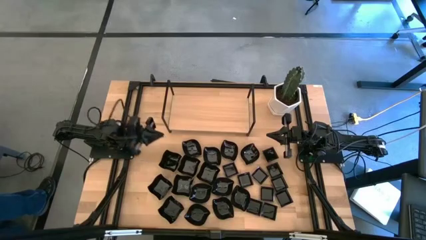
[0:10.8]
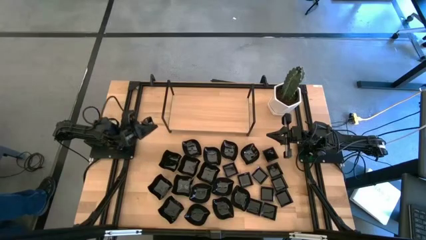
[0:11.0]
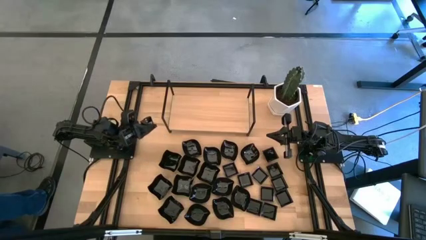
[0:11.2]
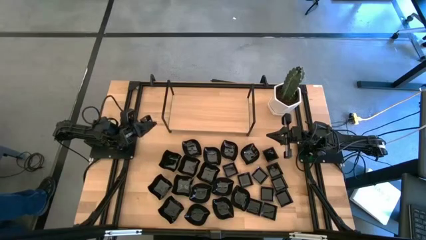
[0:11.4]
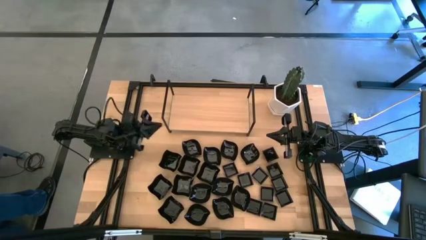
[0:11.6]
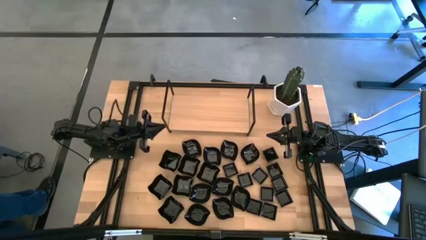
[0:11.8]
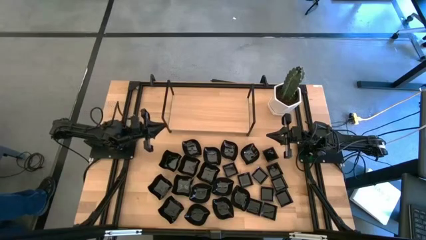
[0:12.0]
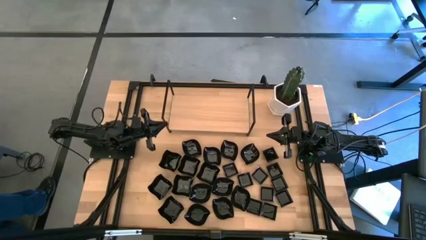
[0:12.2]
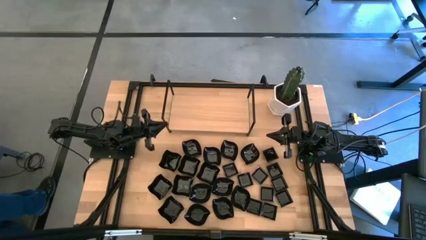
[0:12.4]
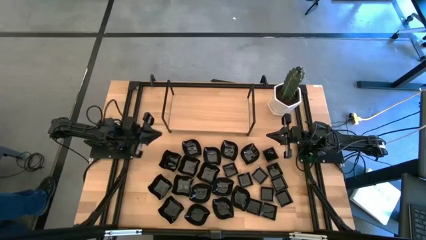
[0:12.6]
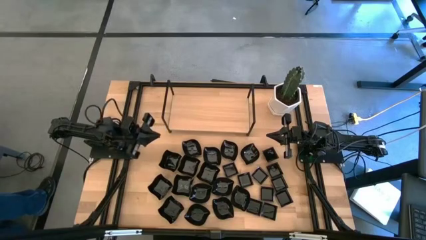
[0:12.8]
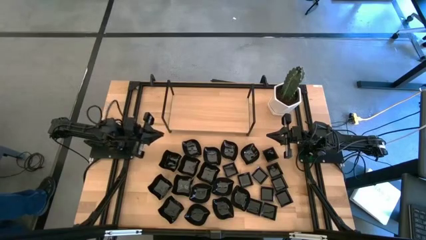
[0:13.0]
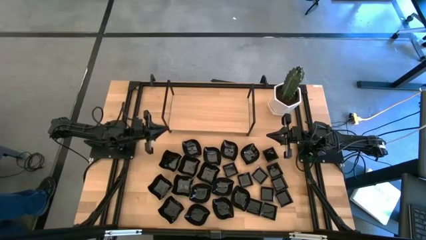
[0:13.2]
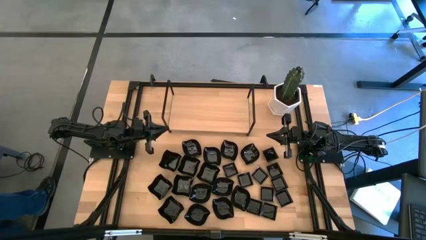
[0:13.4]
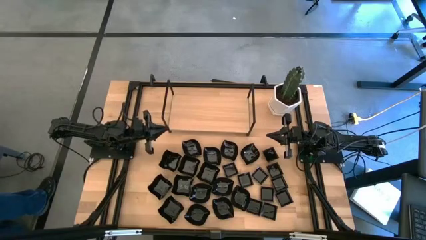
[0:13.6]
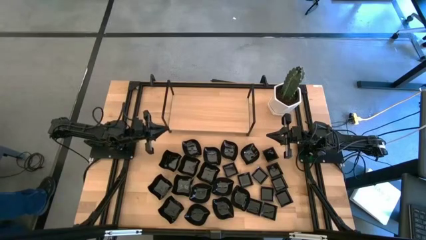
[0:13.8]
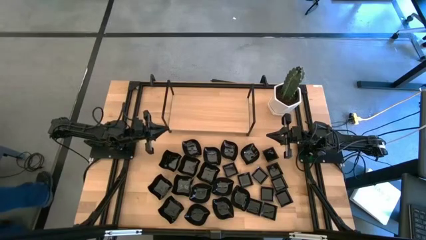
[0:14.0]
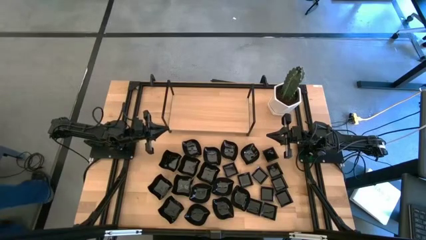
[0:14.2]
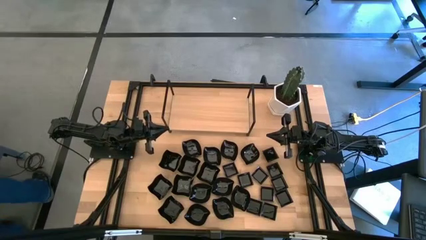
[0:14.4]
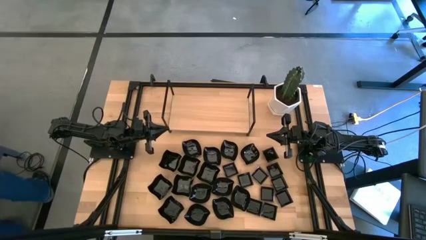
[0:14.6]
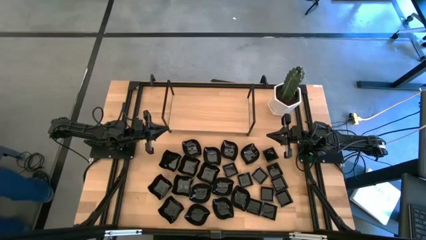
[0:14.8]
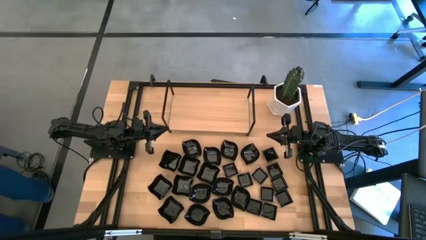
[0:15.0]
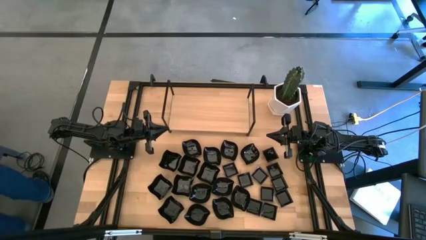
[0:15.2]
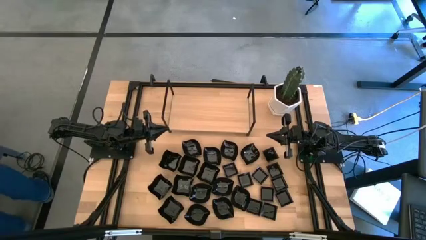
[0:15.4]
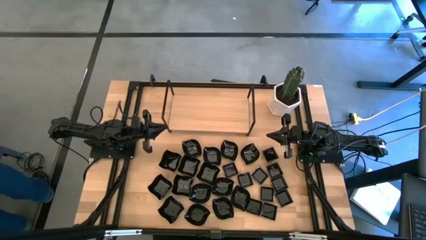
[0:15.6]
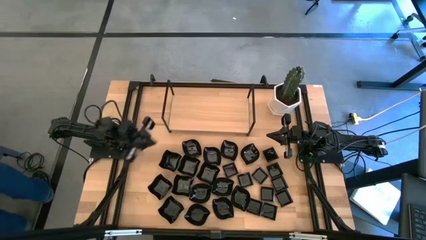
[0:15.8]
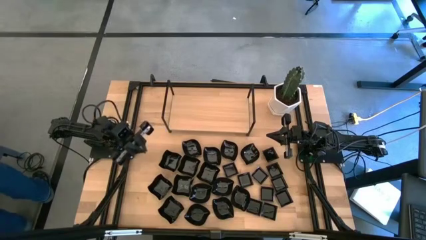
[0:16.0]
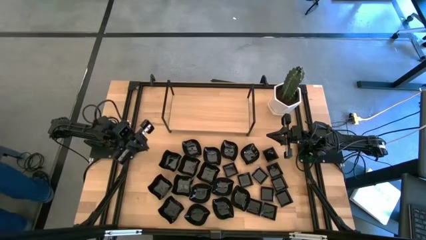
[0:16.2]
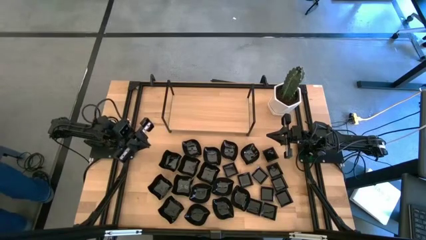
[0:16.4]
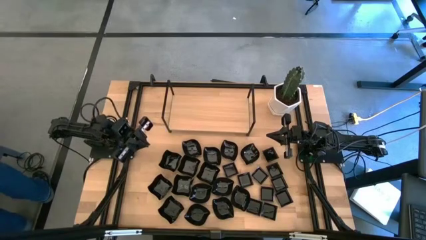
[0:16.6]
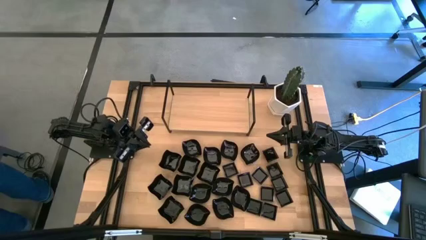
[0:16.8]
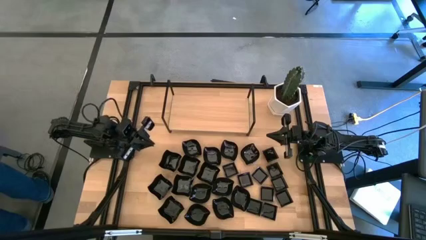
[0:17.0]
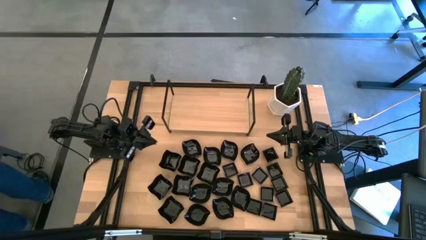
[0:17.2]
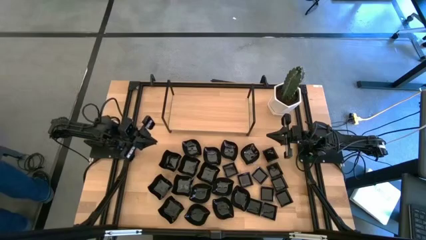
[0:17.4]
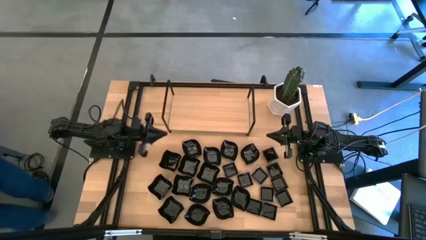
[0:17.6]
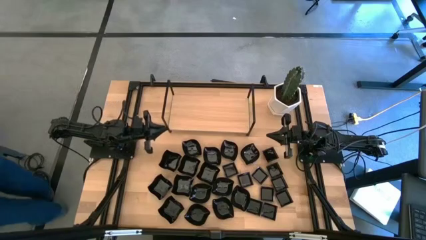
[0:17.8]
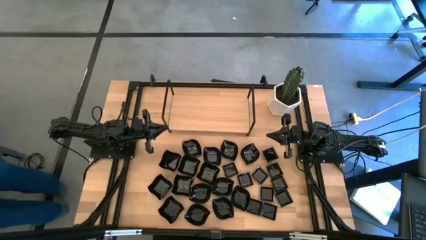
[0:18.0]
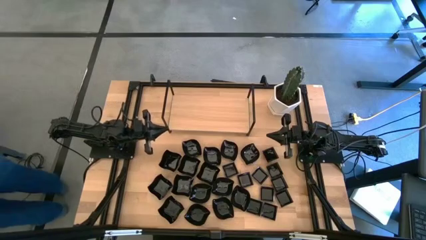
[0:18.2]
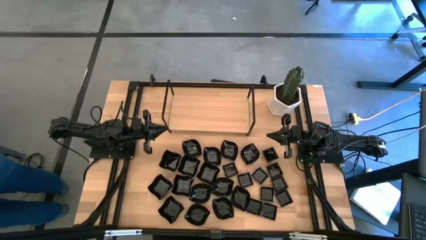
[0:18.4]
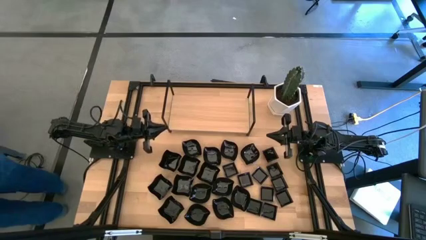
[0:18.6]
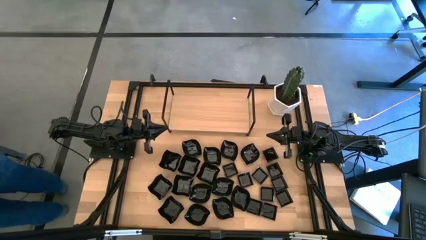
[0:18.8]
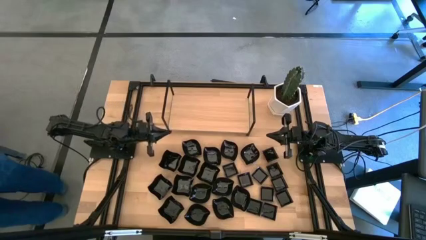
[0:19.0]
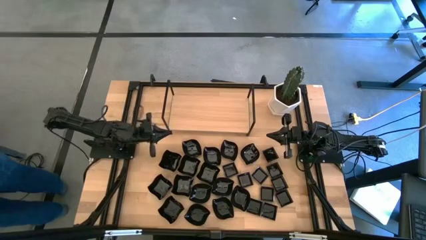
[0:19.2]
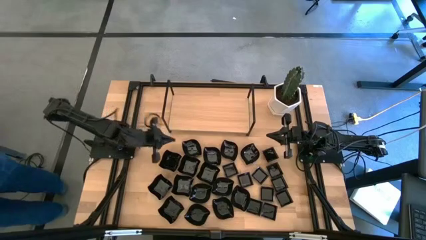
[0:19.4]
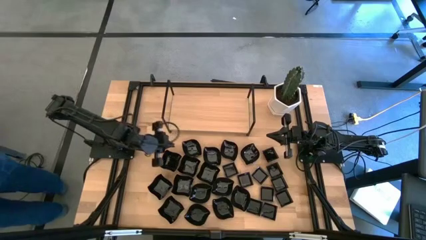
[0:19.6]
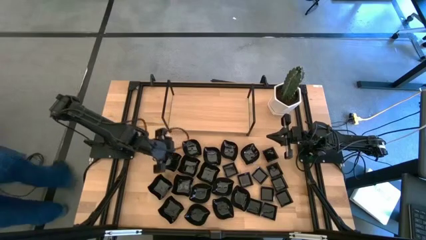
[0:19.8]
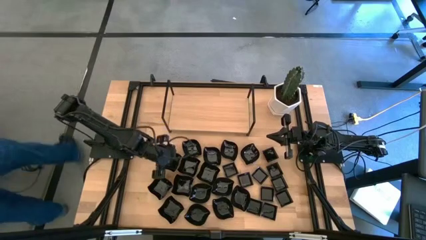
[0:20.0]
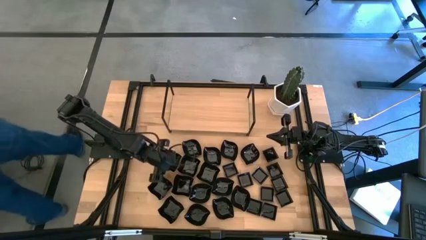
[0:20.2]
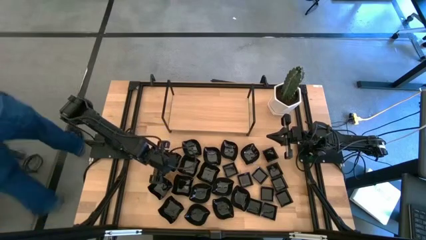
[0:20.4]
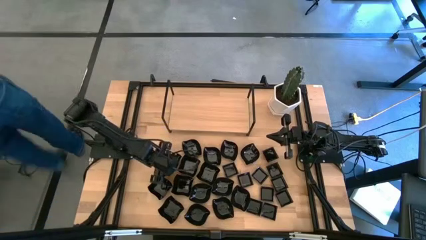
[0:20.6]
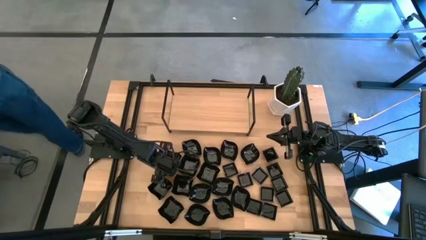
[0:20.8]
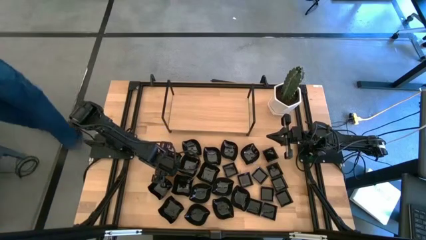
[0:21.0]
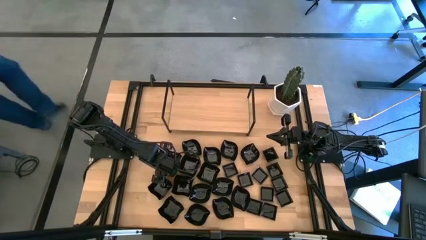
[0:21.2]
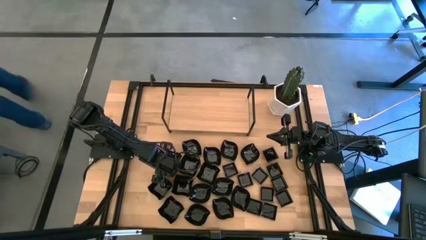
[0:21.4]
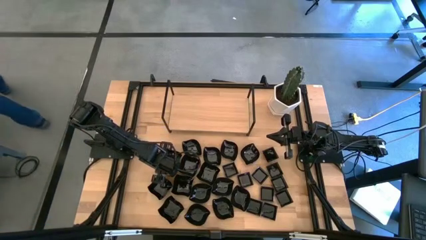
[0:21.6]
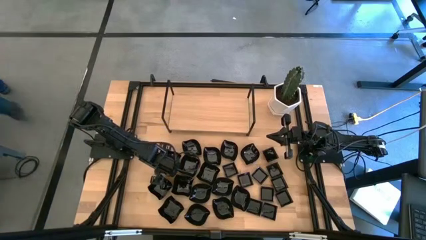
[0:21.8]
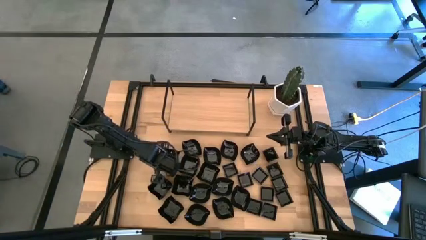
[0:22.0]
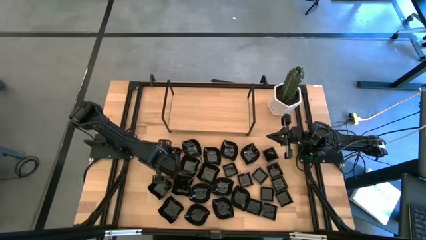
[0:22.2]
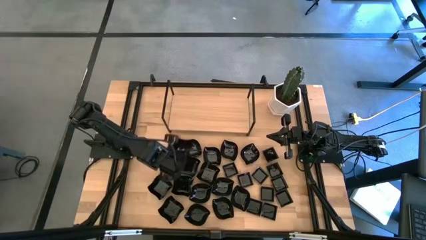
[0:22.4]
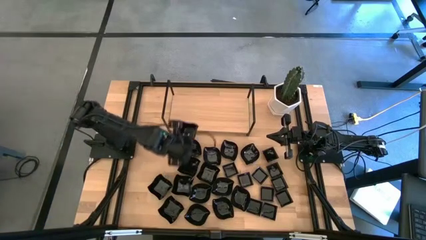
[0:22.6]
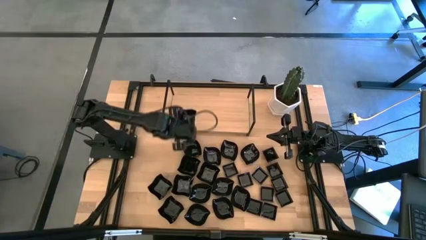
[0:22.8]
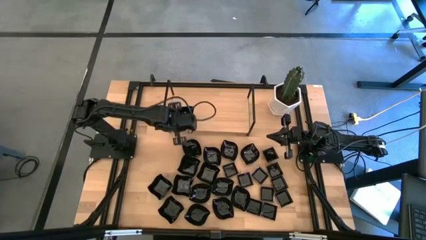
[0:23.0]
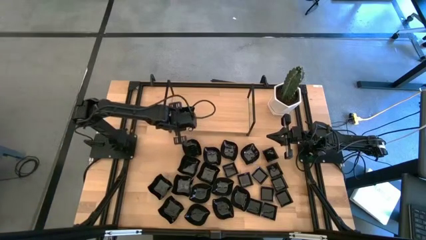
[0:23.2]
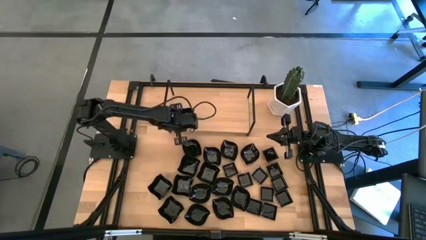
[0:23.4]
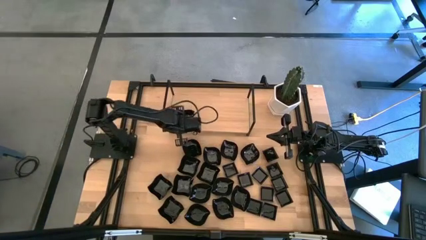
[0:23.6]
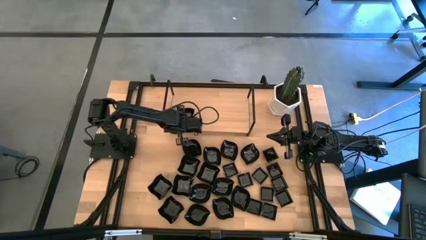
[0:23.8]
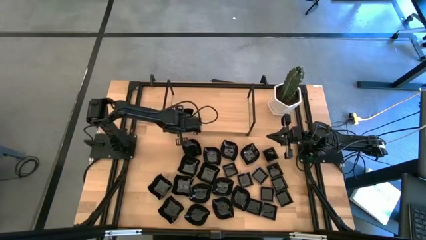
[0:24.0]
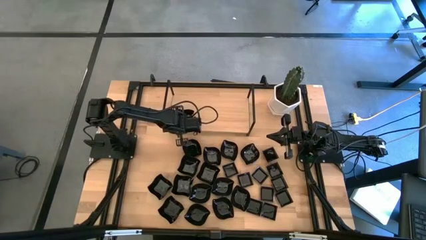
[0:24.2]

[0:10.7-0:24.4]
Task: Pick & Place Mini shaped plates
Put the distorted square plate on the shelf
